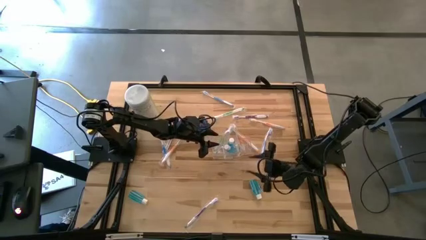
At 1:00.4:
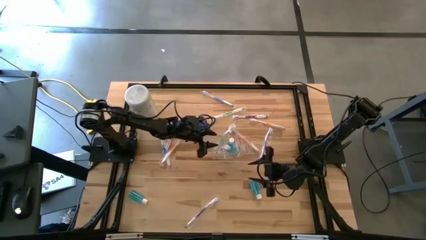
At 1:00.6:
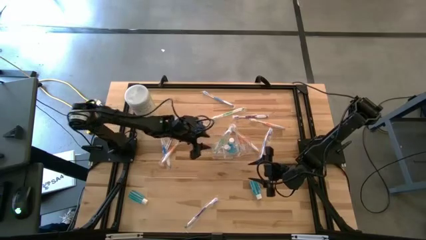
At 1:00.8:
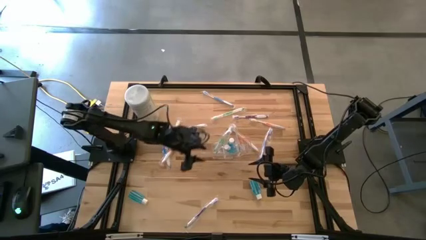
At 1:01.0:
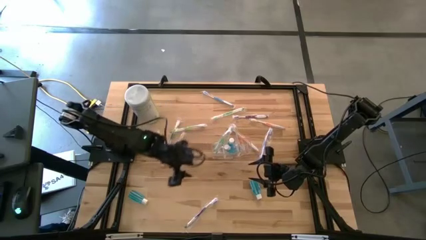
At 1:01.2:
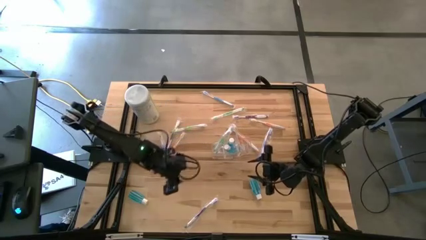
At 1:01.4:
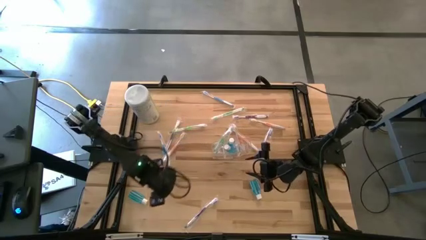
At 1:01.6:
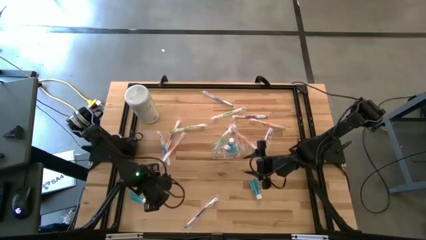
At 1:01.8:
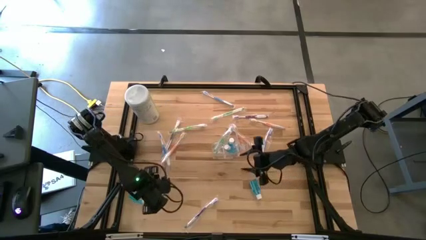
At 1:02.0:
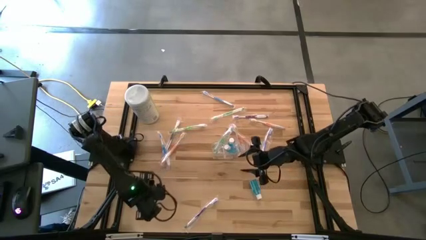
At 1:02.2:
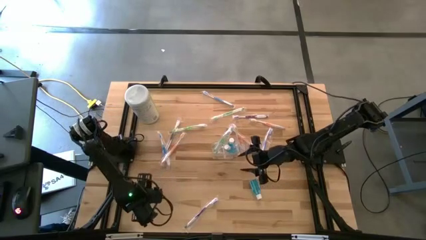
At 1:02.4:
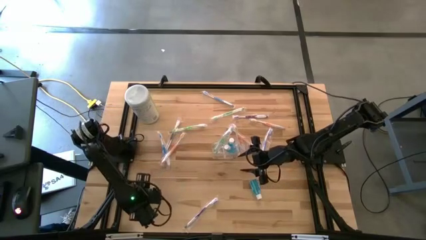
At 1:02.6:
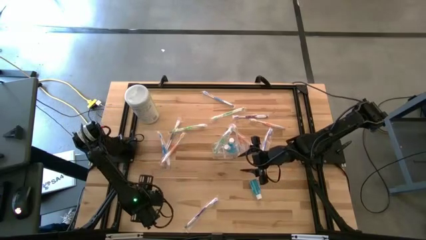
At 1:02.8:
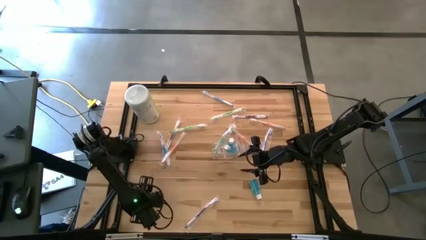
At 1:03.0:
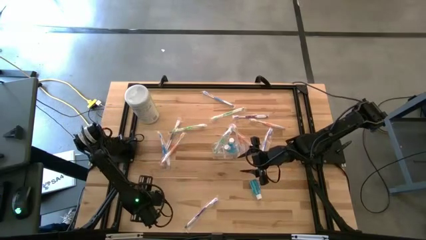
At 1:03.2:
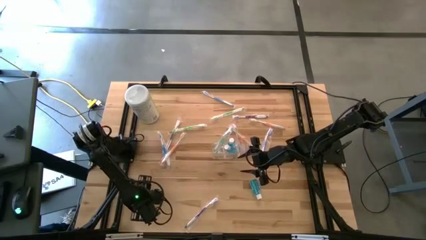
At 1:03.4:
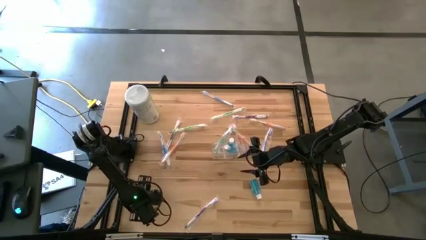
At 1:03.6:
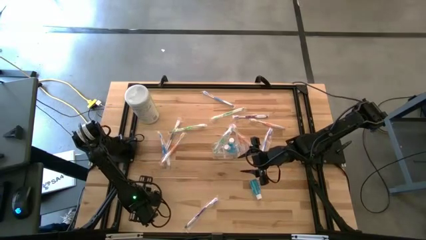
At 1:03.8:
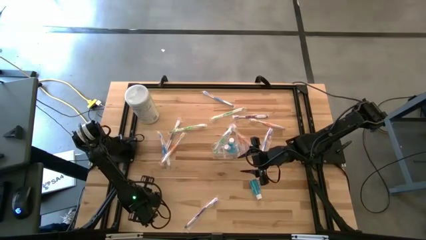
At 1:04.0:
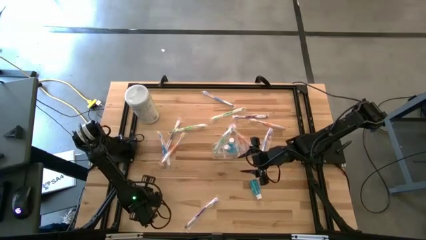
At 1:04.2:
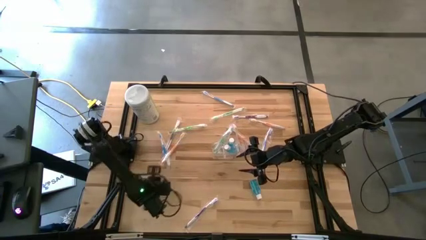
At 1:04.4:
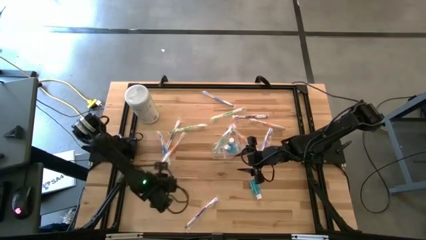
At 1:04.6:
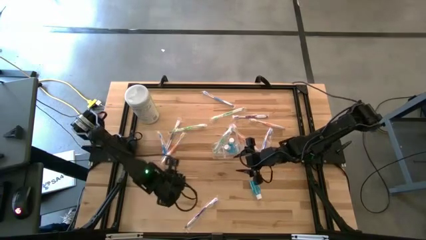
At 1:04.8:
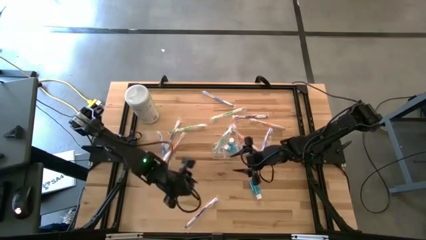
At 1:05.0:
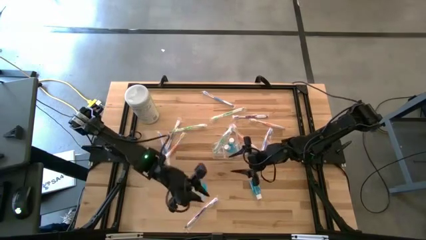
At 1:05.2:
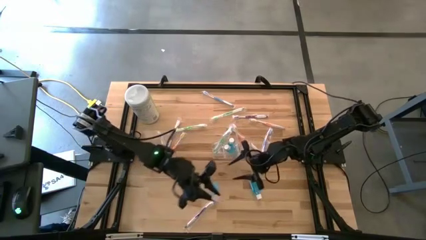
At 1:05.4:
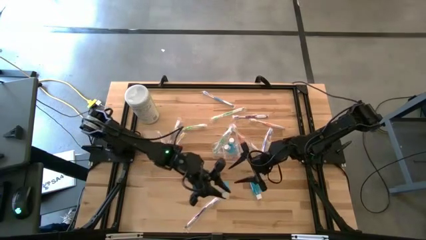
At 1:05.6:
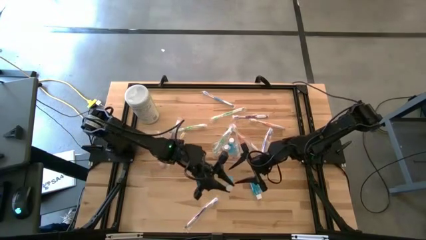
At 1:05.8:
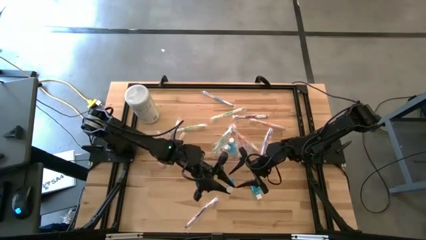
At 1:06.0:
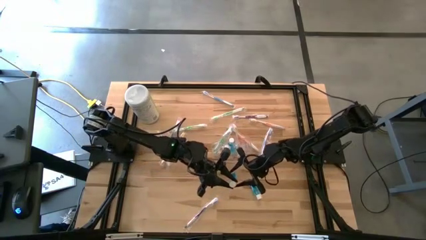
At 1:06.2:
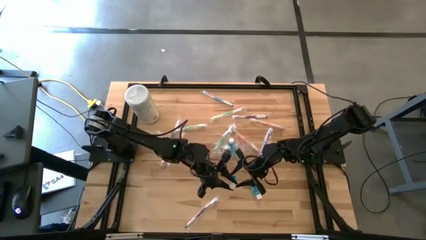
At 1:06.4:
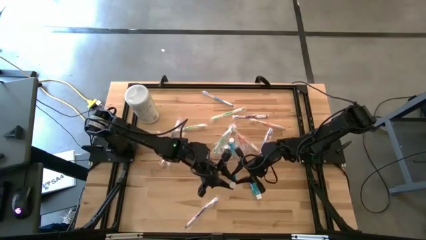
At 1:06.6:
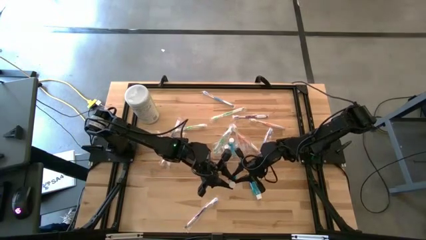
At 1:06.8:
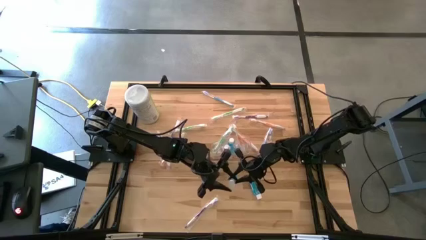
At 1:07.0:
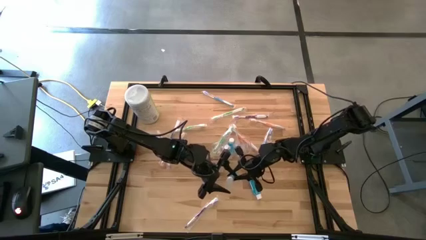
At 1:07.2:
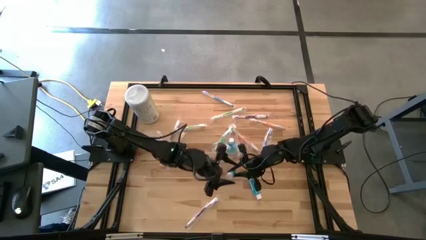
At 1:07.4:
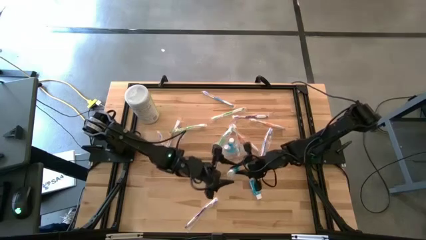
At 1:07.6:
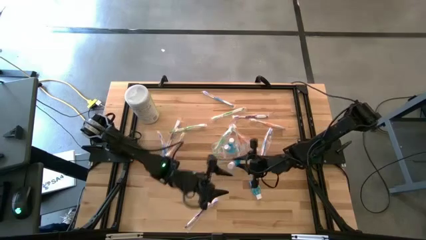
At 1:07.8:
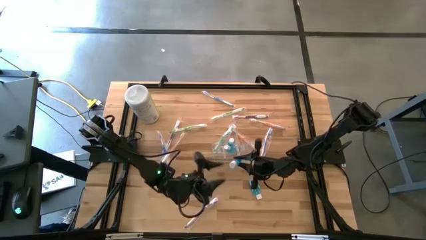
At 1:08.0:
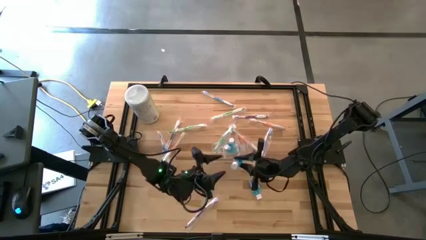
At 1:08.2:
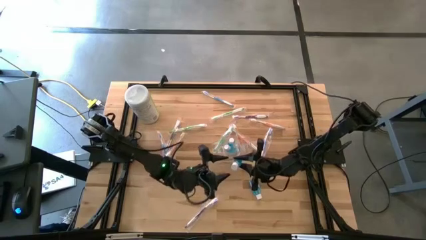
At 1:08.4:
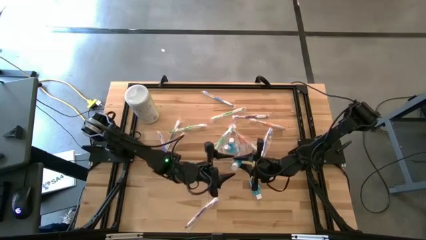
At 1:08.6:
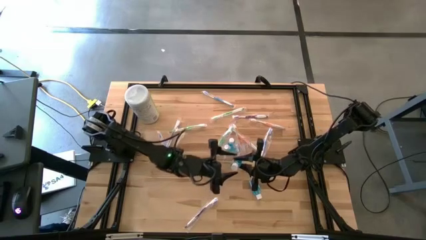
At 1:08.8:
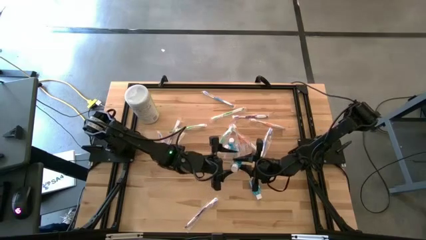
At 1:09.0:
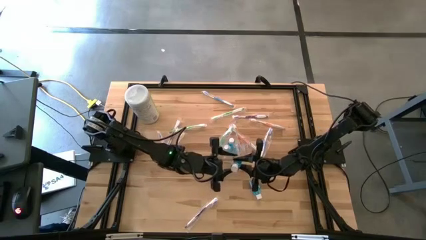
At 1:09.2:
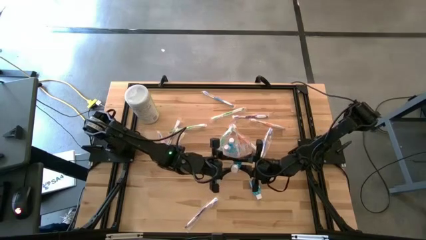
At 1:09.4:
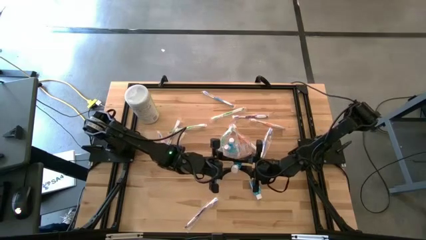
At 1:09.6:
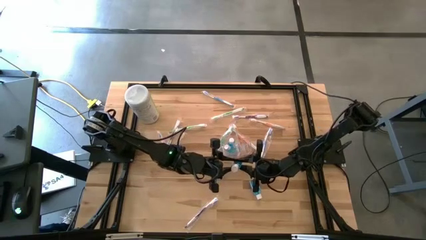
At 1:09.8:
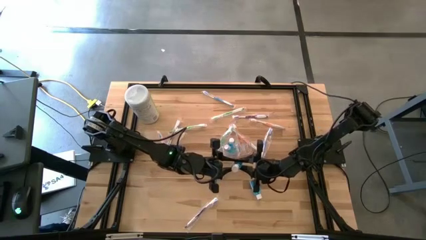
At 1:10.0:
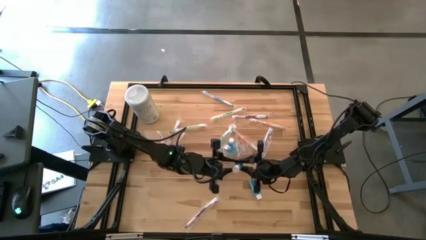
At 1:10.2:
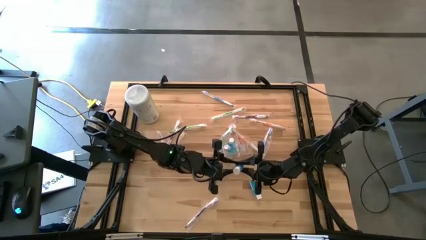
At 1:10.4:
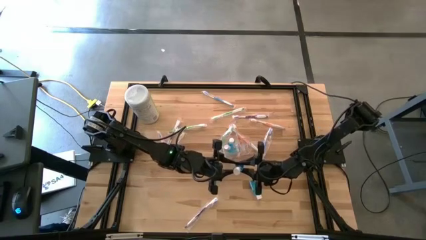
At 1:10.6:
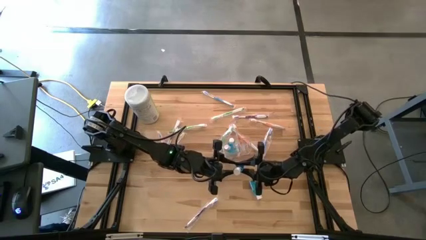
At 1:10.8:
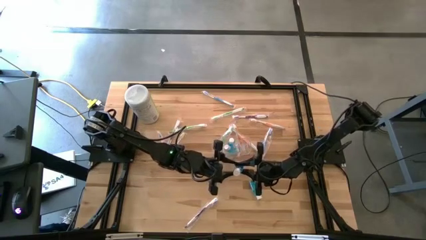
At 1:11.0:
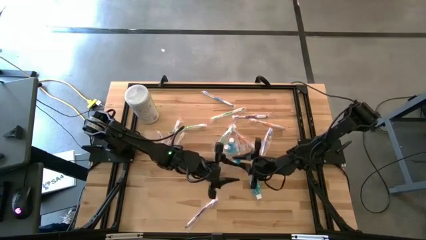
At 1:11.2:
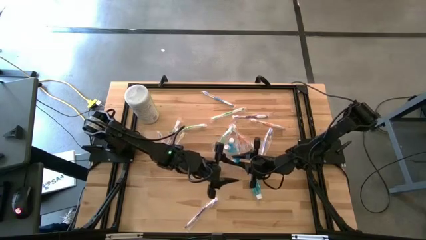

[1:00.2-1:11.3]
Task: Pick & Place toothbrushing station
Put the blue mouthwash into the transparent organizer

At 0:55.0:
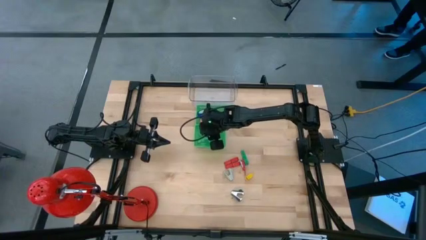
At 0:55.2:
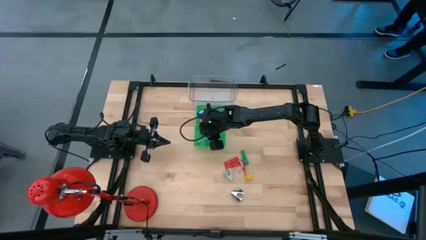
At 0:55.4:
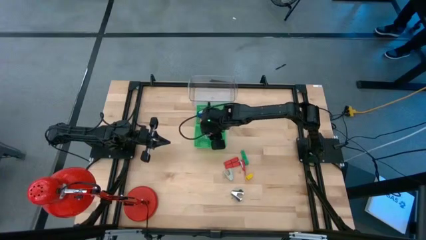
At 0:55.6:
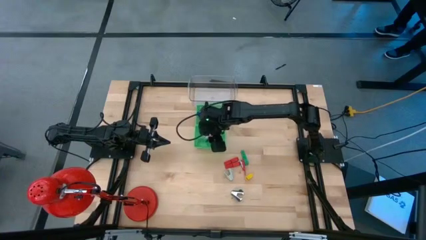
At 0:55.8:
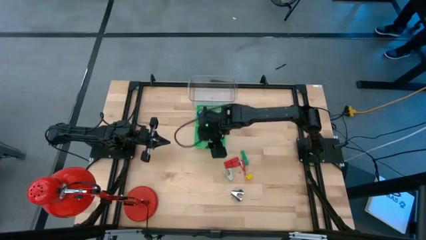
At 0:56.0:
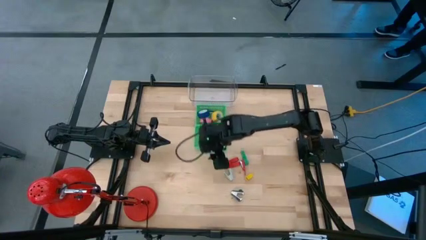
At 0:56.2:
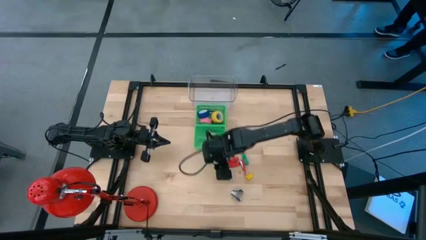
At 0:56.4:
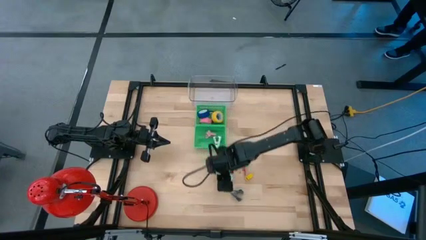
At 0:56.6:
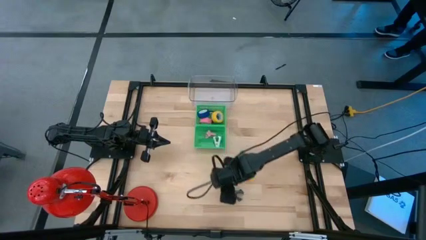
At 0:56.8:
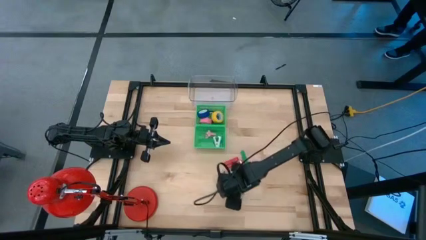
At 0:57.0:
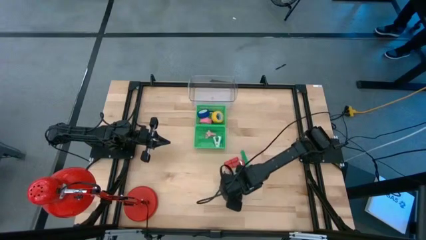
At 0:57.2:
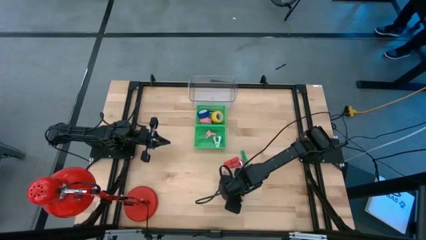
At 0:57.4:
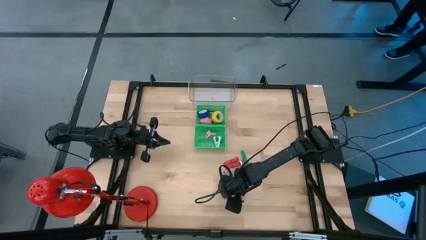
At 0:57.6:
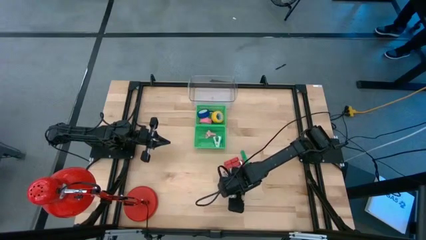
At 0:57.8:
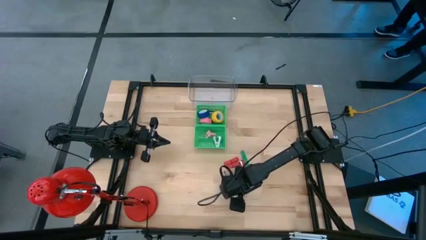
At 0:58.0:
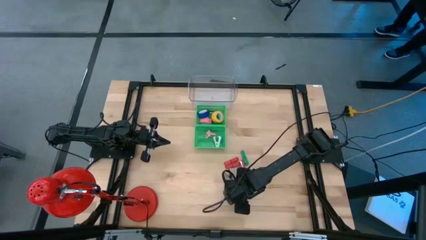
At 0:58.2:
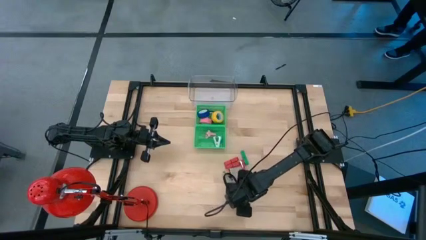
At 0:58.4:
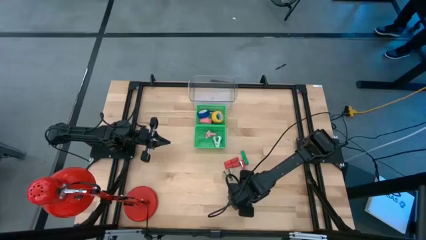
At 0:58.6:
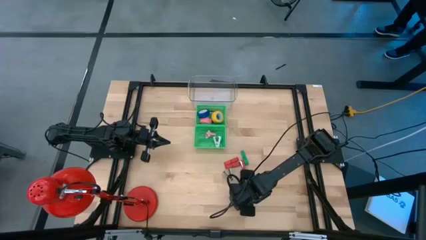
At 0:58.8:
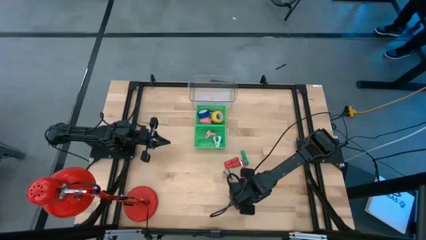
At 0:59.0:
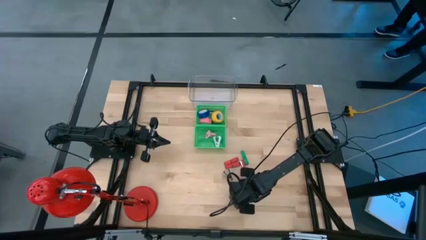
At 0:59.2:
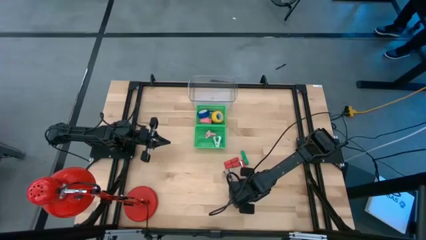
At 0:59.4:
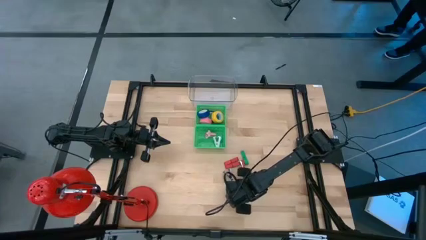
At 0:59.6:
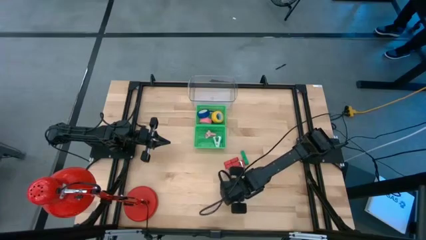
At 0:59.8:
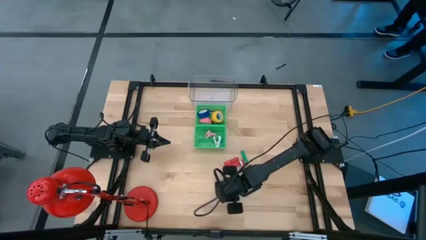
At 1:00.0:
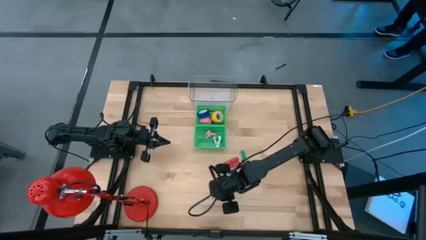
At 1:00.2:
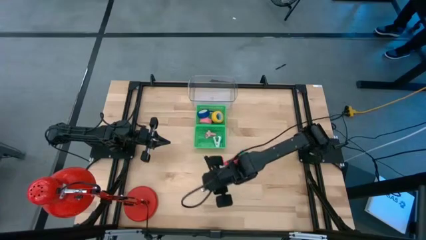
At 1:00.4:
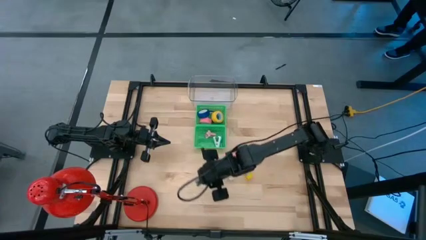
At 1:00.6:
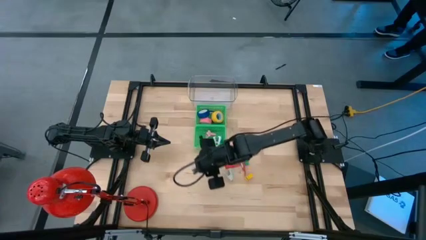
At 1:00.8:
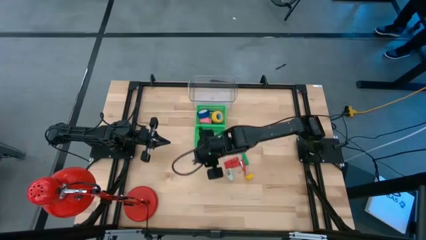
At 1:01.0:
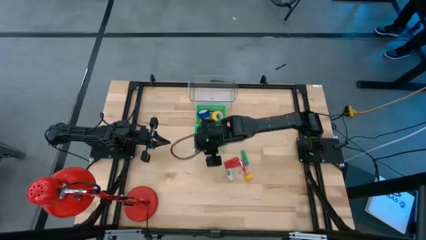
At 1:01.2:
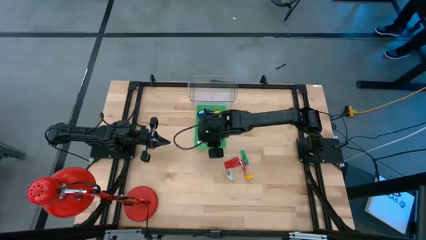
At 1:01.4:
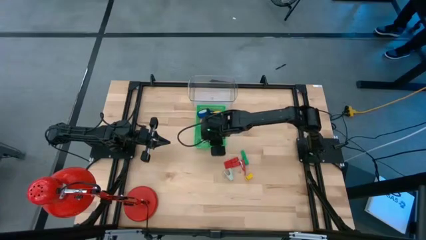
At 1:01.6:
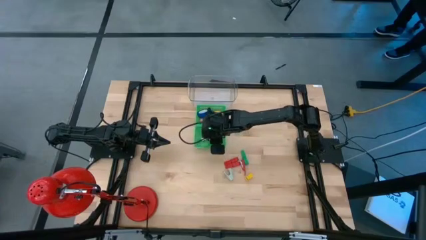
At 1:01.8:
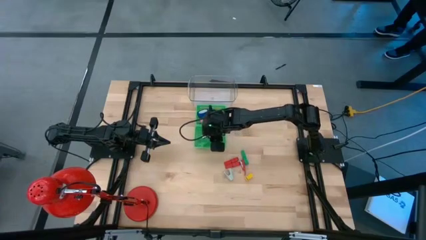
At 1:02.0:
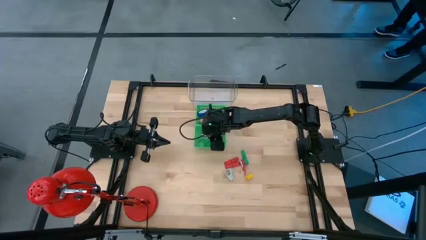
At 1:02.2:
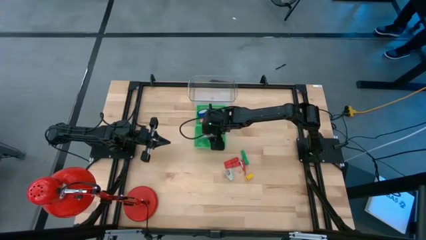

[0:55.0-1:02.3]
Task: Pick and place Stapler, Stapler remover, tape
Put the dark gray staple remover into the bottom green bin
